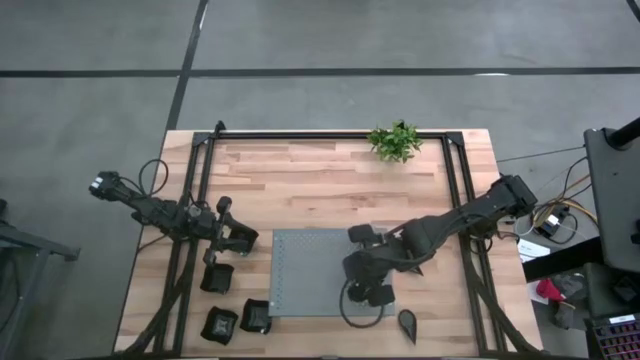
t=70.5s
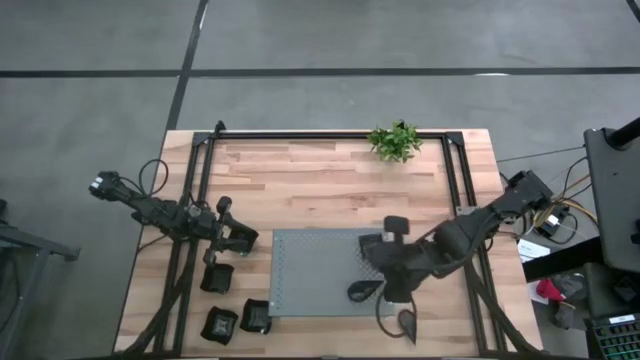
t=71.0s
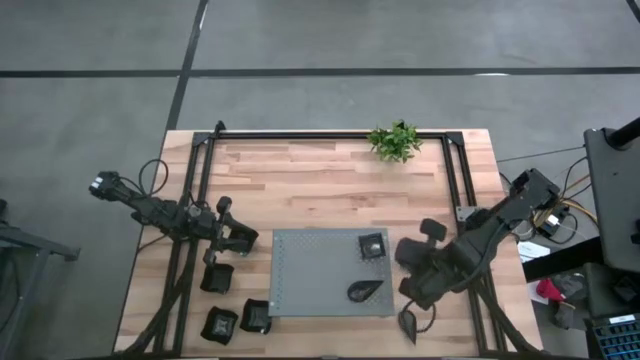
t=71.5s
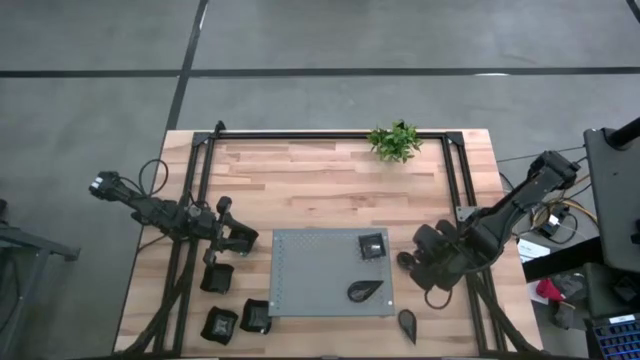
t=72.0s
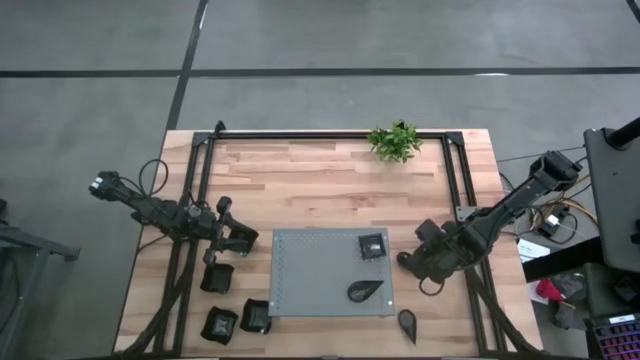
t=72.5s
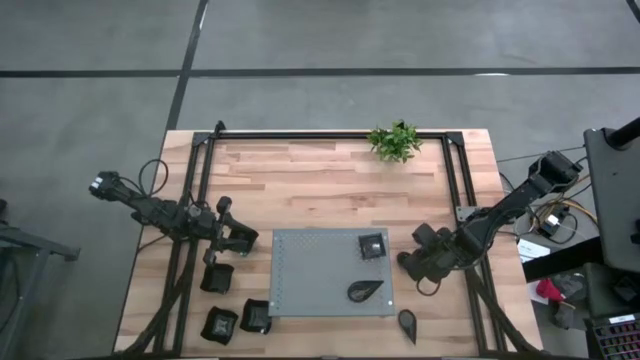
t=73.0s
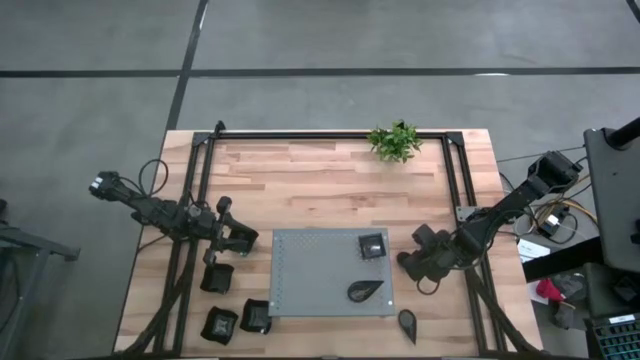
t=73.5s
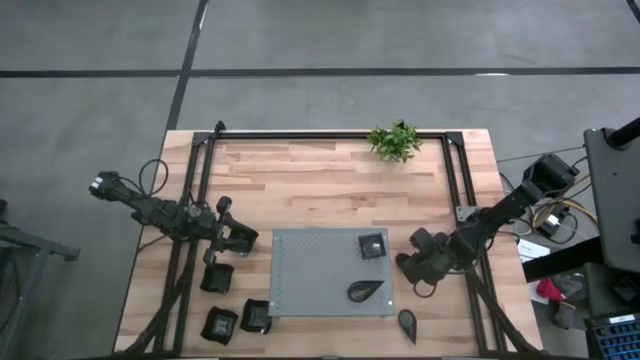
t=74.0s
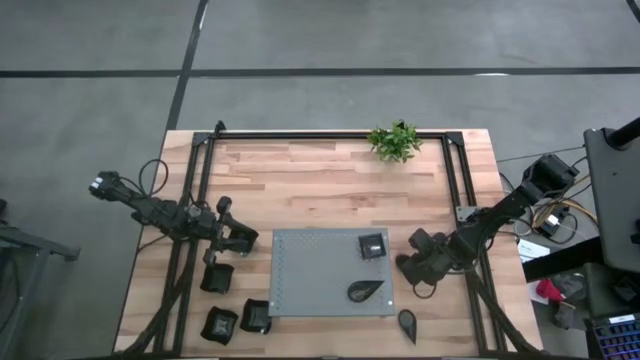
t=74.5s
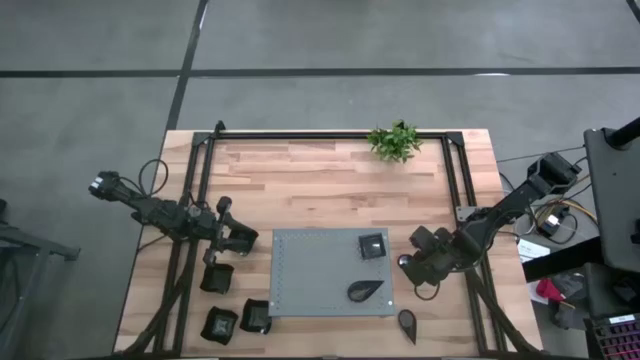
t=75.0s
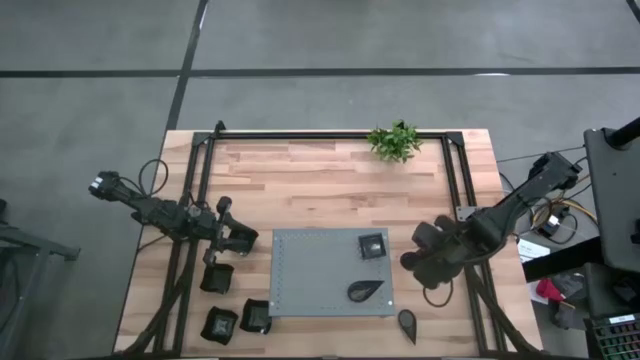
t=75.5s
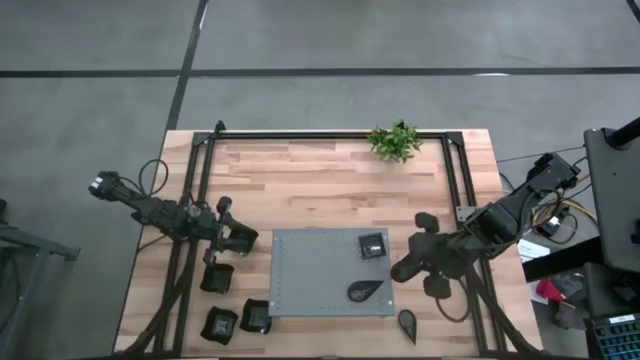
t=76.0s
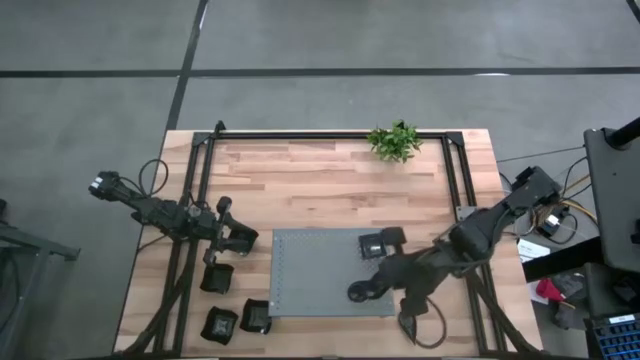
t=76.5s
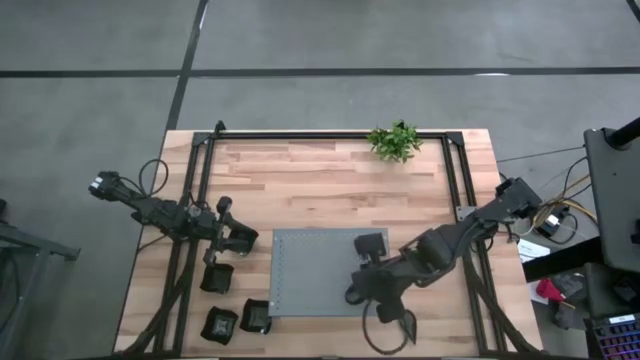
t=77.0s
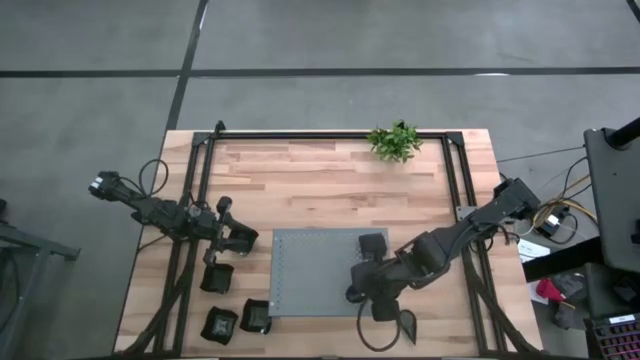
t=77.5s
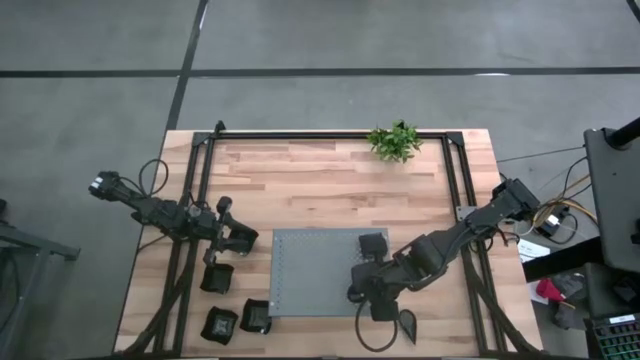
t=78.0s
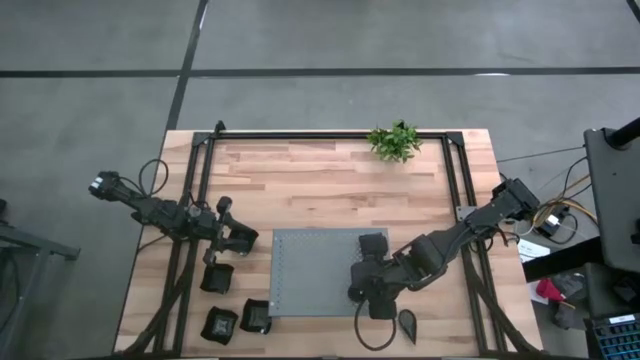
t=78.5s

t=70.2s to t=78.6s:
Task: Pick & Place Mini shaped plates
Stack the drop-shaped plate on top of the drop-shaped plate on the shelf

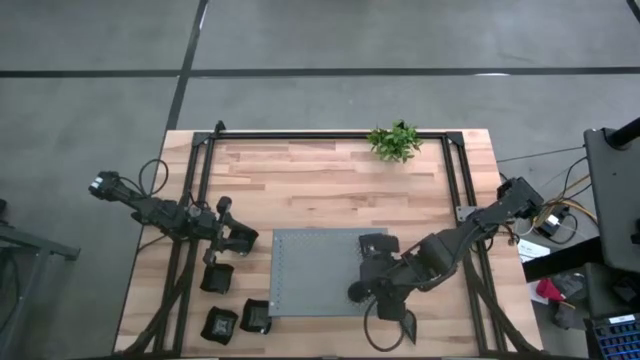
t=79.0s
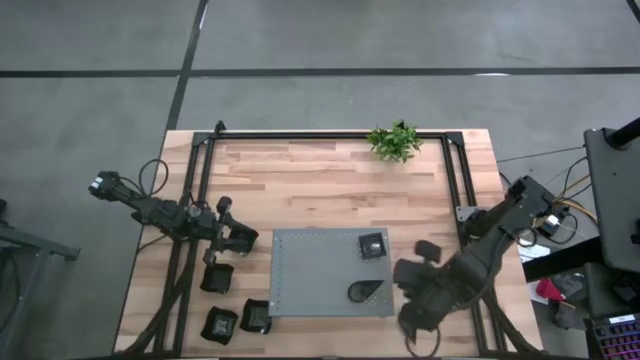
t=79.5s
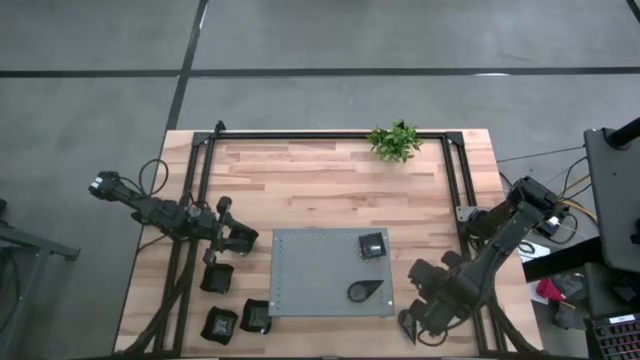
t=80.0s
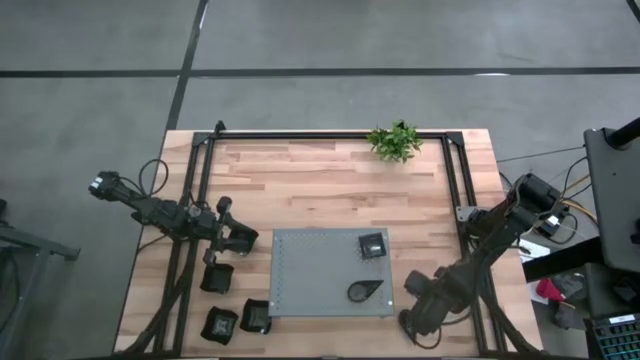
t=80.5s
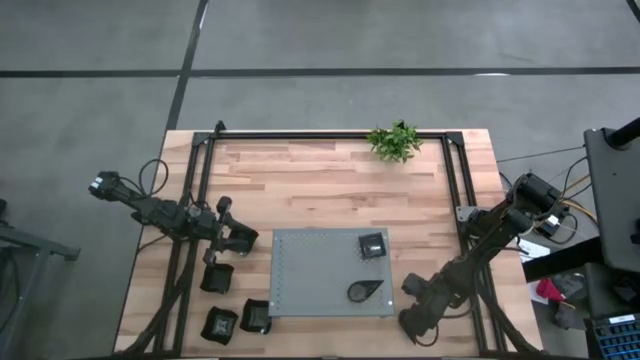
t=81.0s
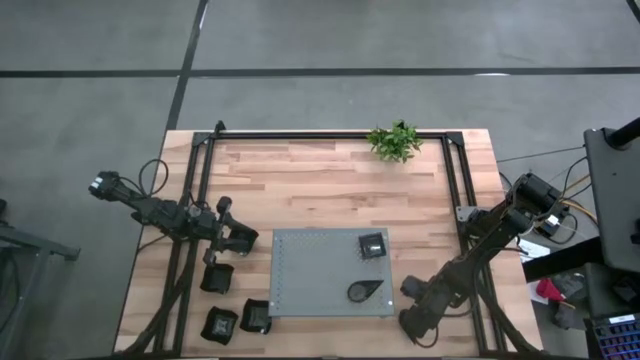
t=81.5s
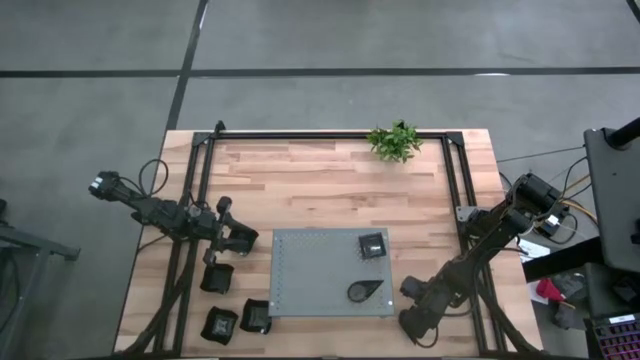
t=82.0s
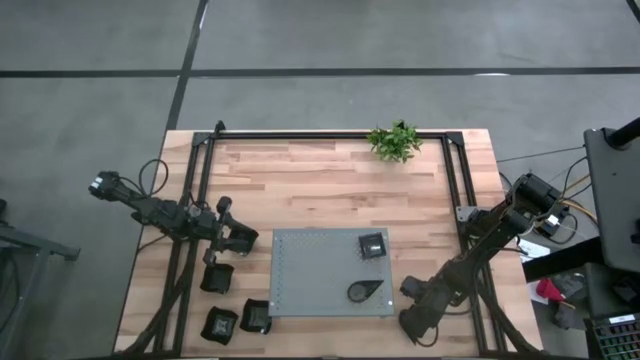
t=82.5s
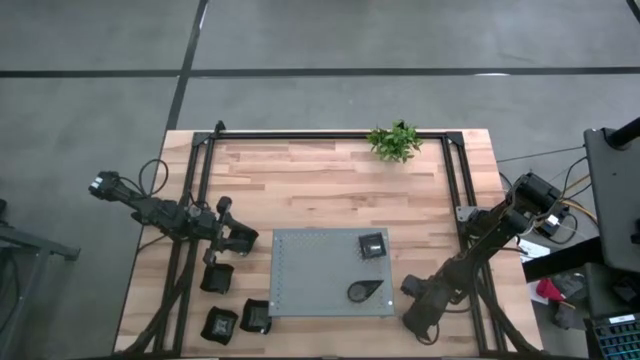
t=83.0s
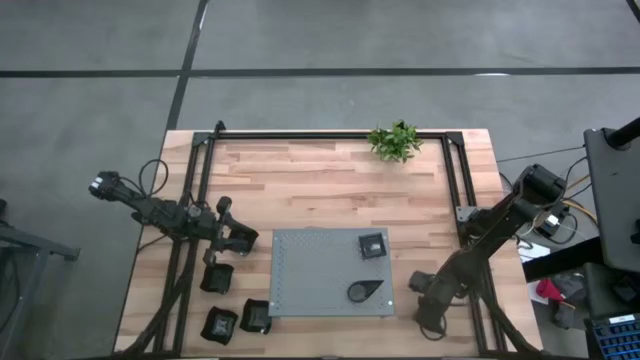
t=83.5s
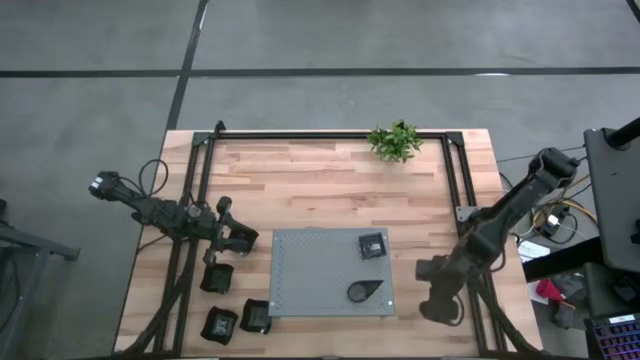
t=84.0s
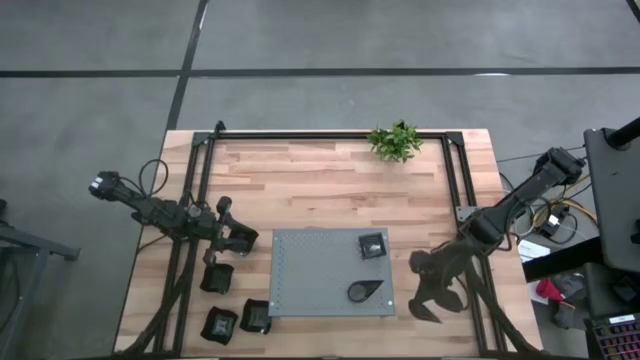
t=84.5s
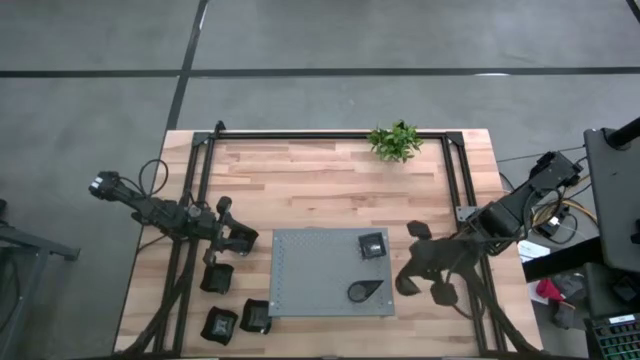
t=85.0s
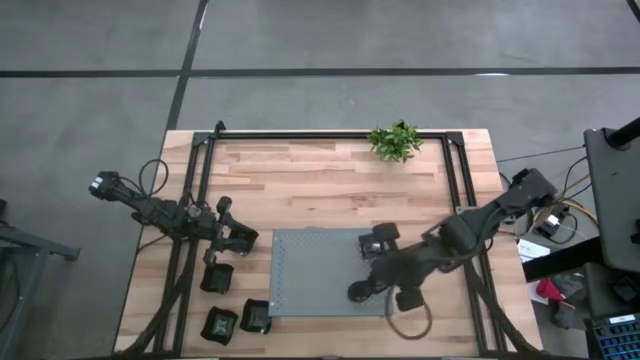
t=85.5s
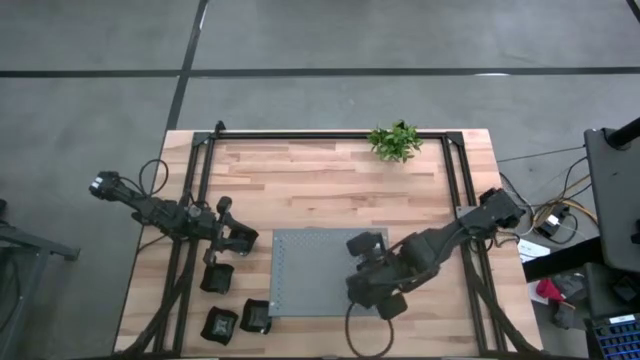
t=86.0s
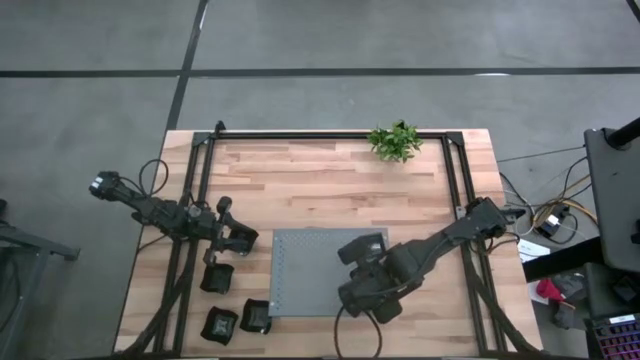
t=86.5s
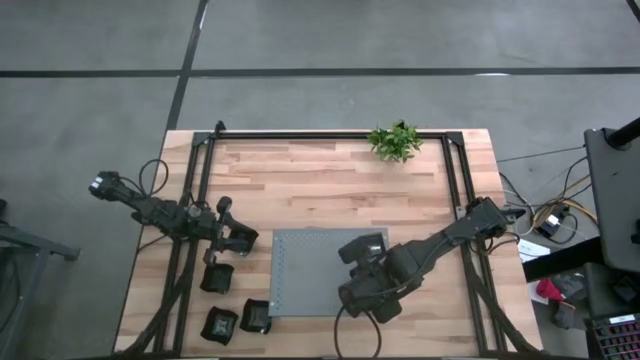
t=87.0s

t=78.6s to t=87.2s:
Stack the drop-shaped plate on top of the drop-shaped plate on the shelf

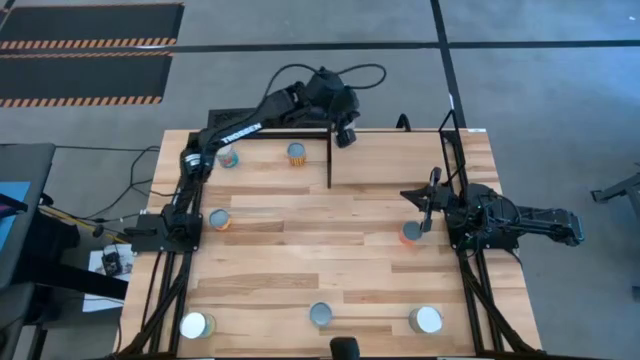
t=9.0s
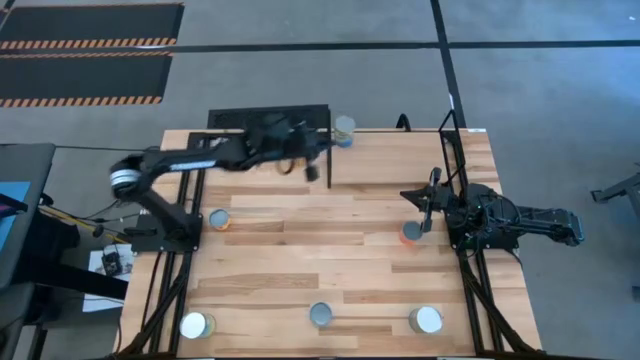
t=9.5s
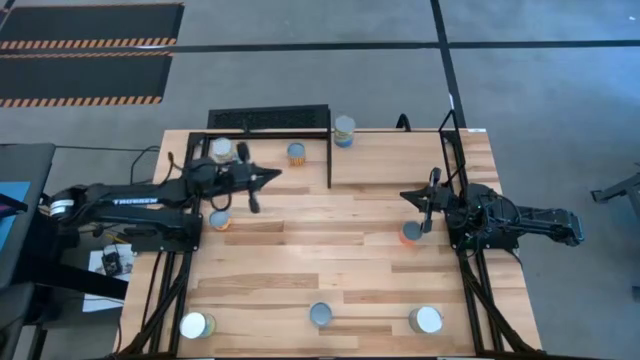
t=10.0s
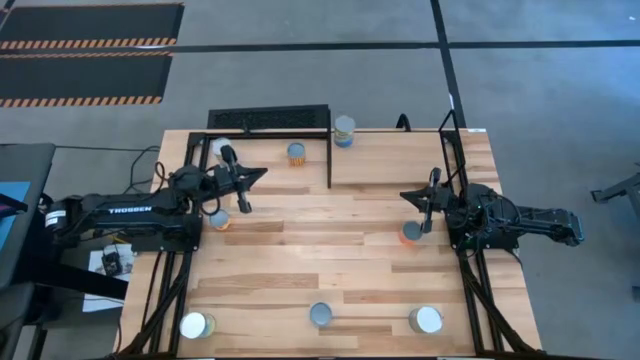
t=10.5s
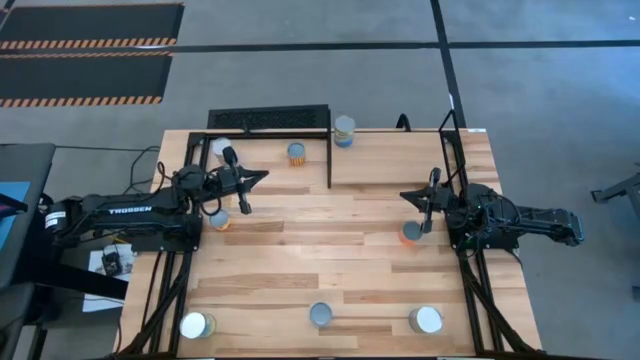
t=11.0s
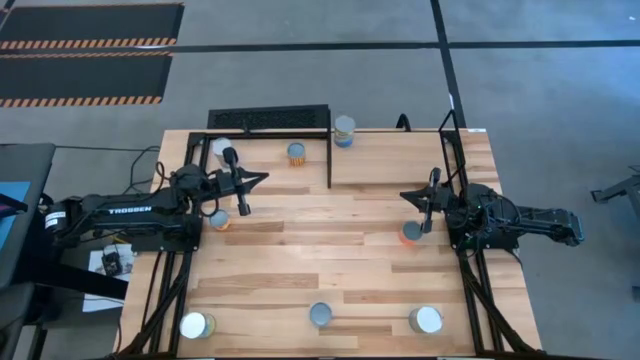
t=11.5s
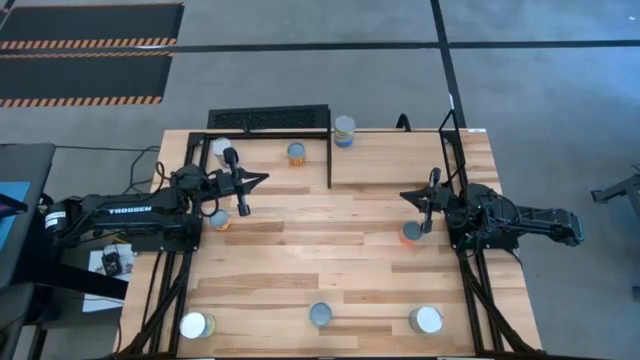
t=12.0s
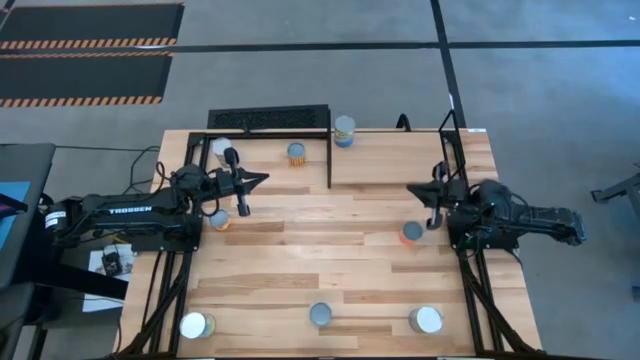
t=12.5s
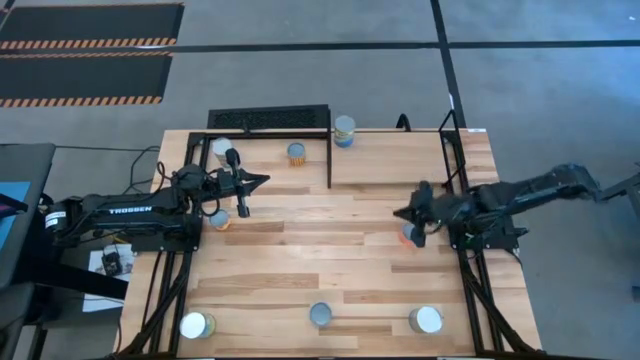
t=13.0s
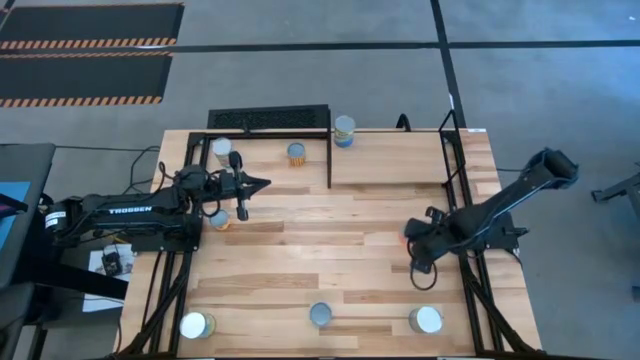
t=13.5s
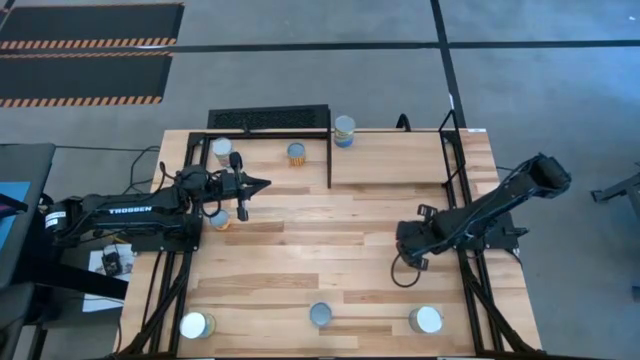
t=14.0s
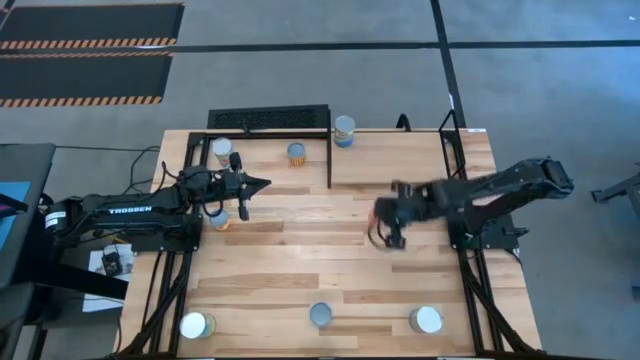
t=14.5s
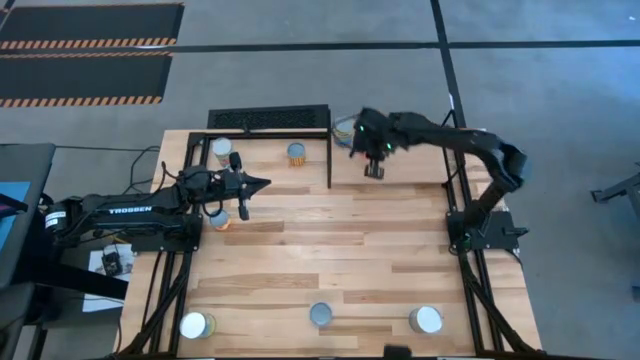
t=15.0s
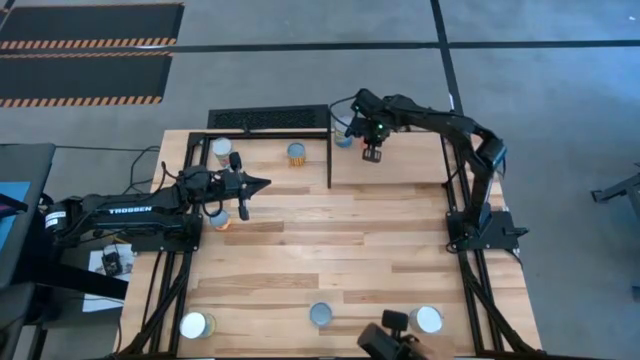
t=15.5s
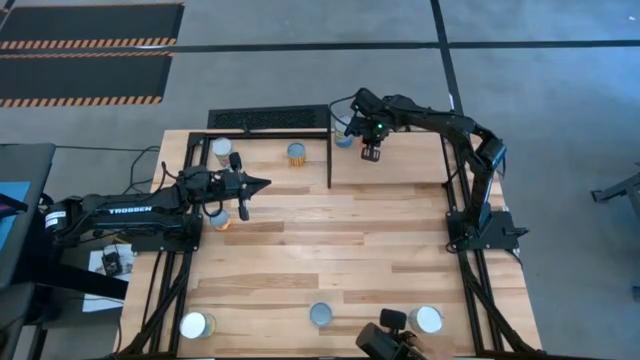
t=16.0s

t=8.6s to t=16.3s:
Task: Pick and place cans onto a shelf
Put the canned orange on the shelf
